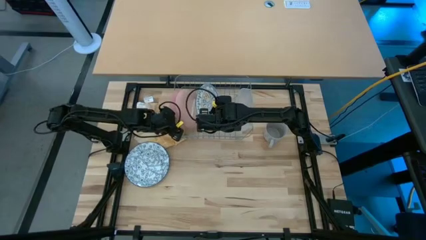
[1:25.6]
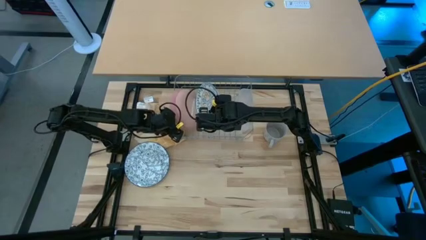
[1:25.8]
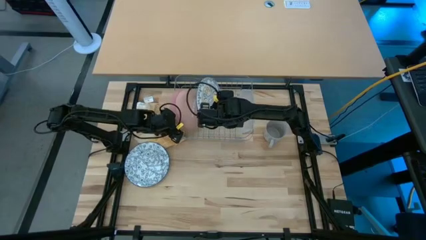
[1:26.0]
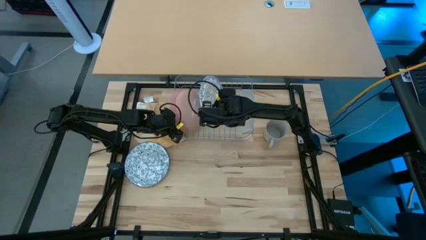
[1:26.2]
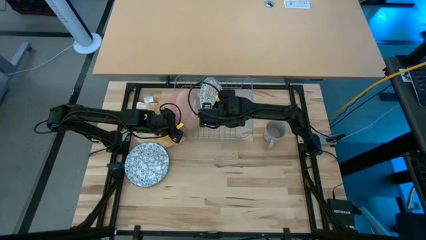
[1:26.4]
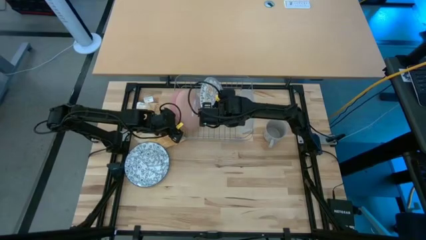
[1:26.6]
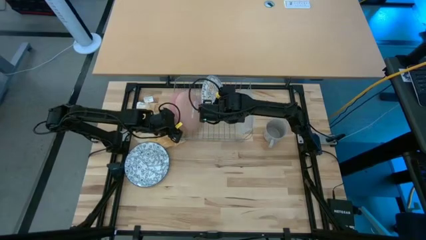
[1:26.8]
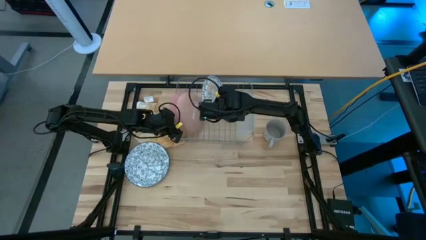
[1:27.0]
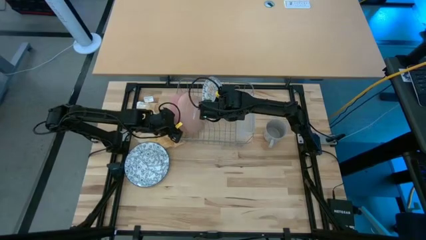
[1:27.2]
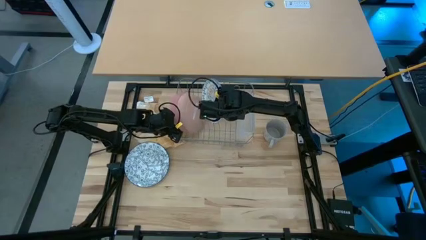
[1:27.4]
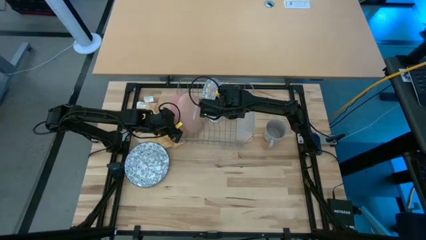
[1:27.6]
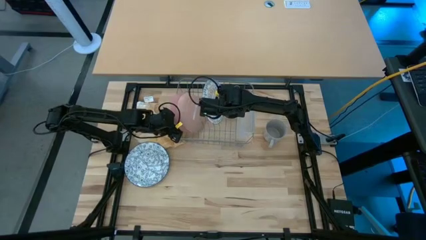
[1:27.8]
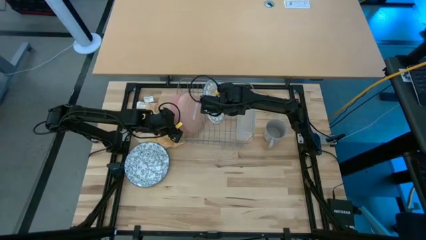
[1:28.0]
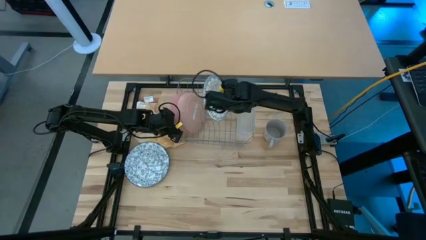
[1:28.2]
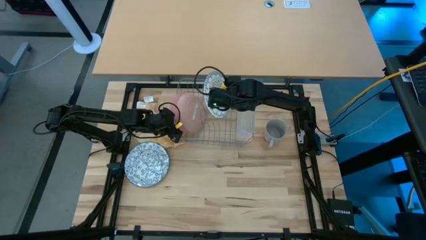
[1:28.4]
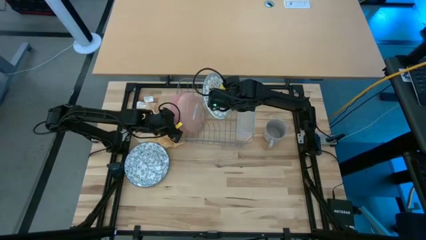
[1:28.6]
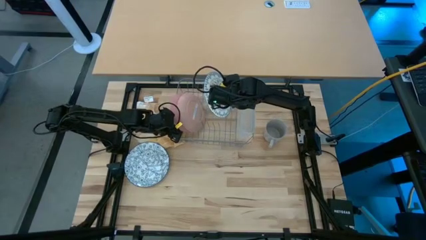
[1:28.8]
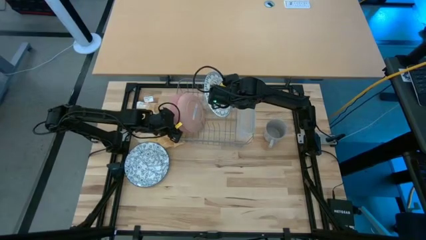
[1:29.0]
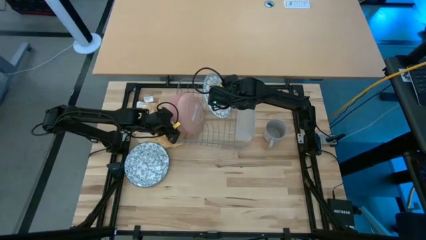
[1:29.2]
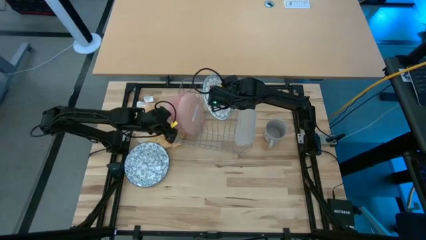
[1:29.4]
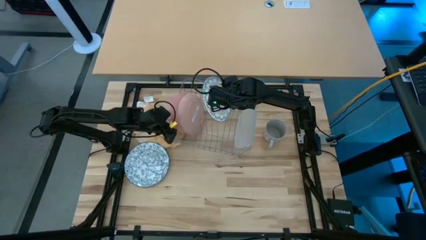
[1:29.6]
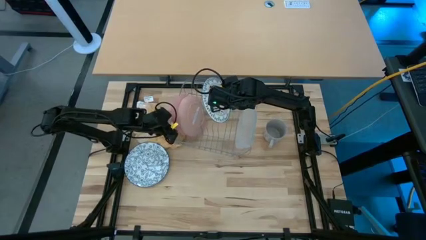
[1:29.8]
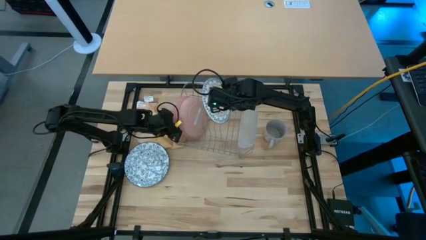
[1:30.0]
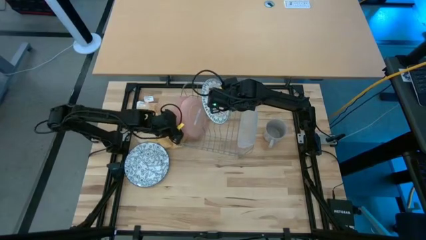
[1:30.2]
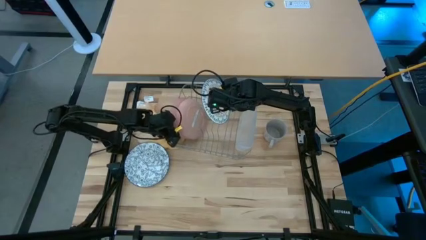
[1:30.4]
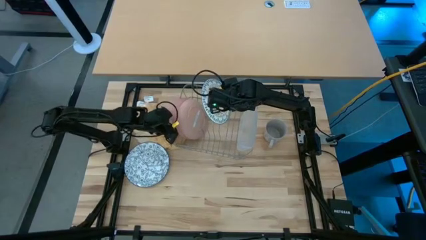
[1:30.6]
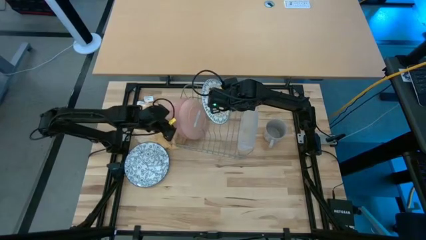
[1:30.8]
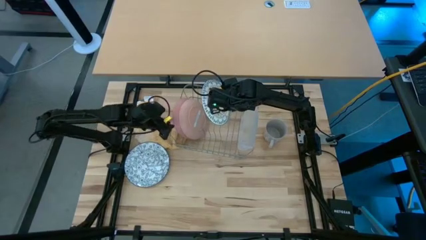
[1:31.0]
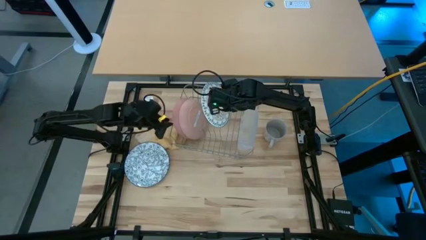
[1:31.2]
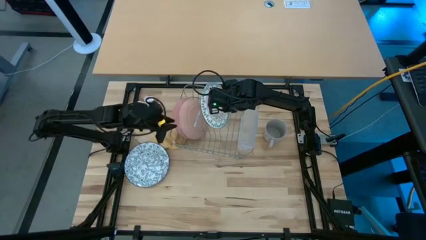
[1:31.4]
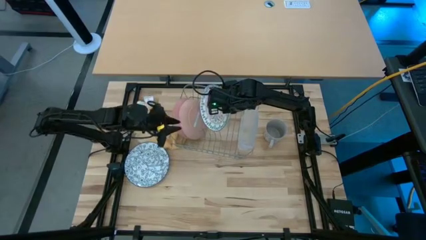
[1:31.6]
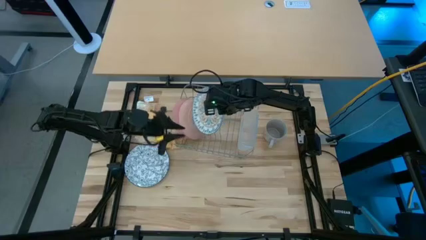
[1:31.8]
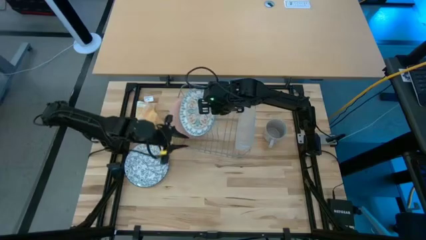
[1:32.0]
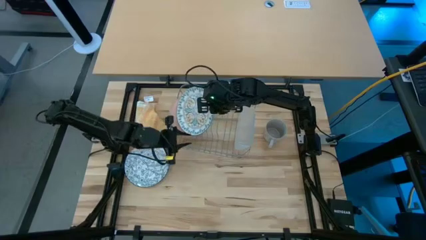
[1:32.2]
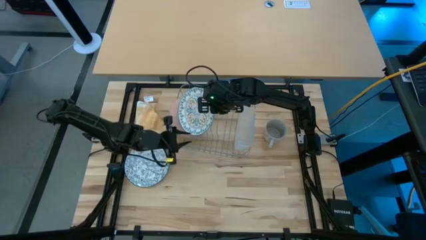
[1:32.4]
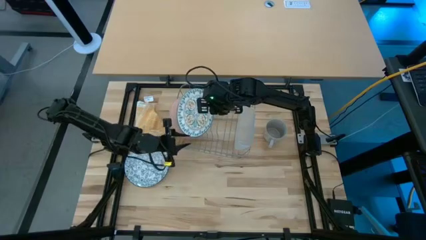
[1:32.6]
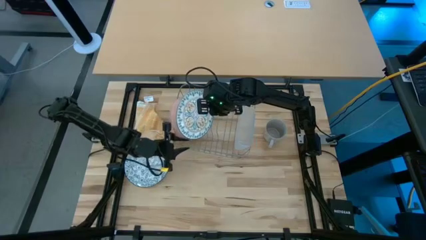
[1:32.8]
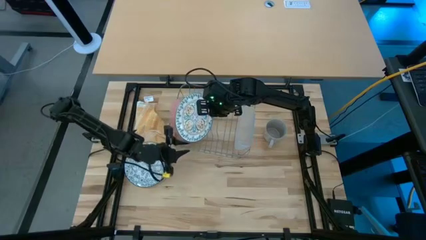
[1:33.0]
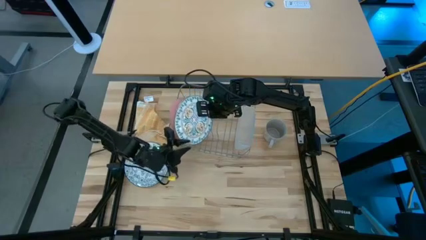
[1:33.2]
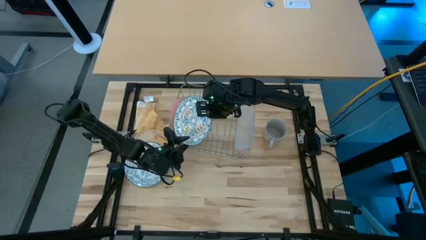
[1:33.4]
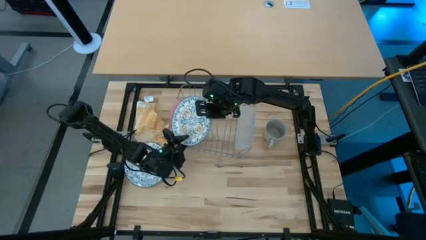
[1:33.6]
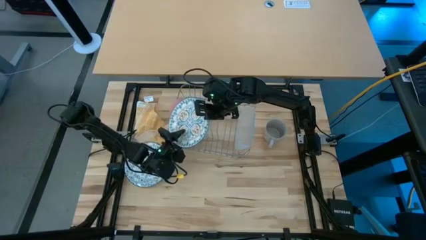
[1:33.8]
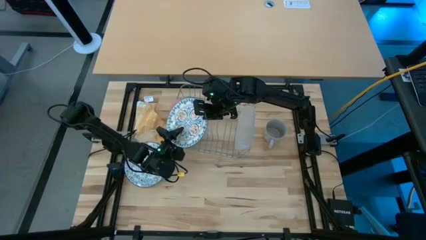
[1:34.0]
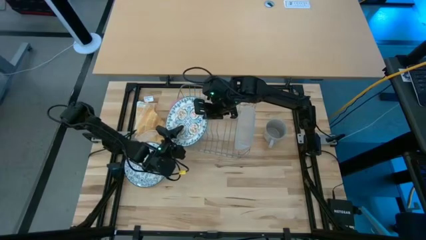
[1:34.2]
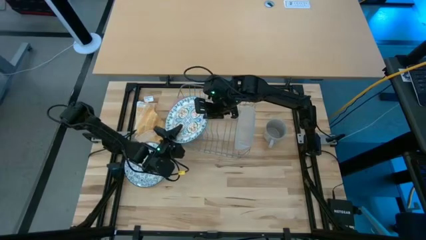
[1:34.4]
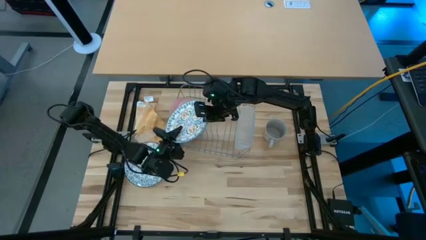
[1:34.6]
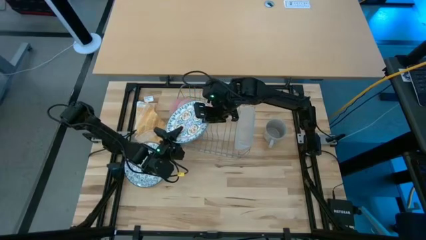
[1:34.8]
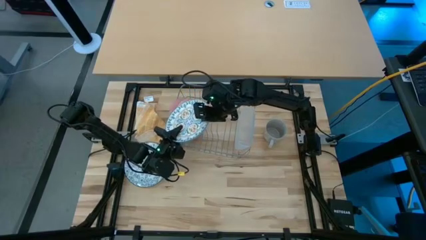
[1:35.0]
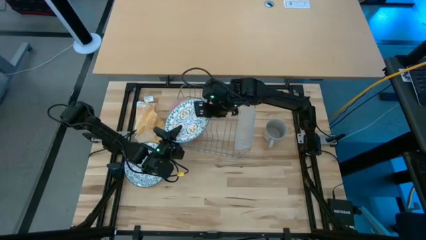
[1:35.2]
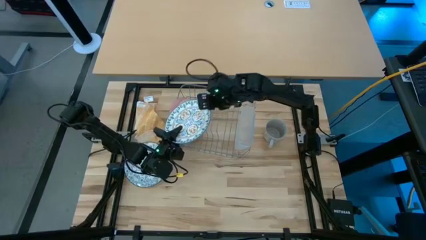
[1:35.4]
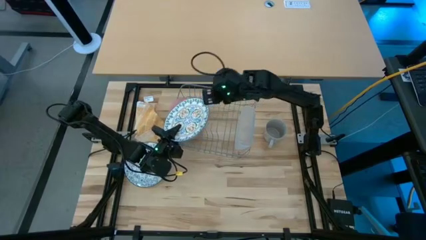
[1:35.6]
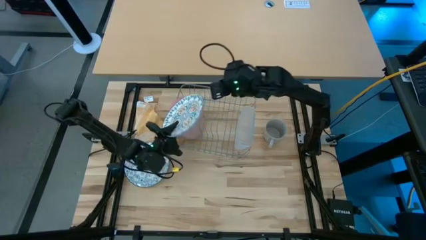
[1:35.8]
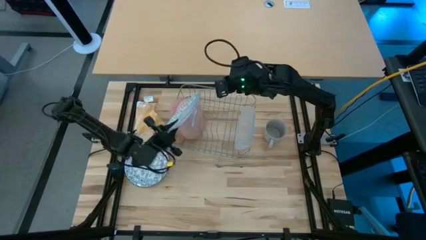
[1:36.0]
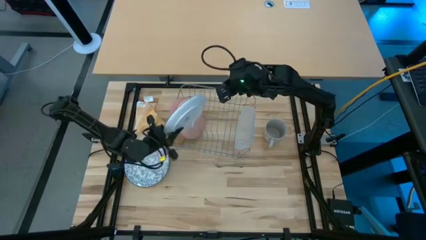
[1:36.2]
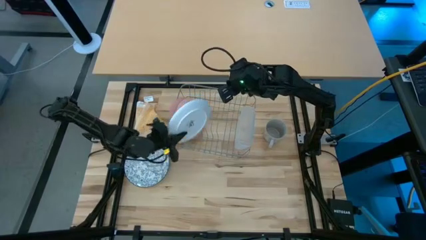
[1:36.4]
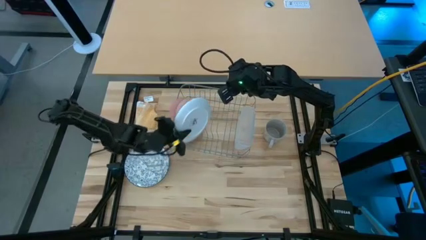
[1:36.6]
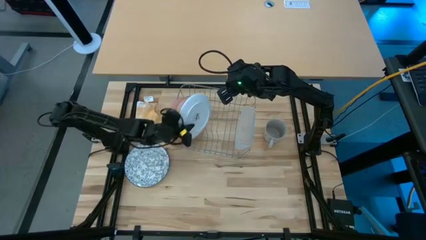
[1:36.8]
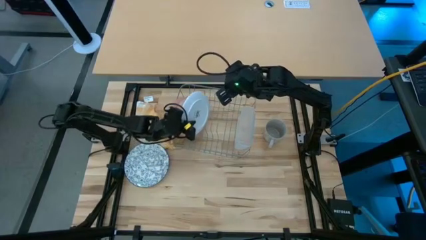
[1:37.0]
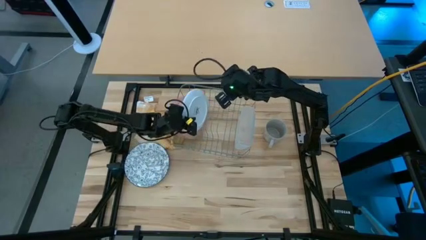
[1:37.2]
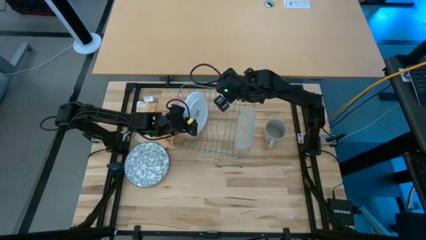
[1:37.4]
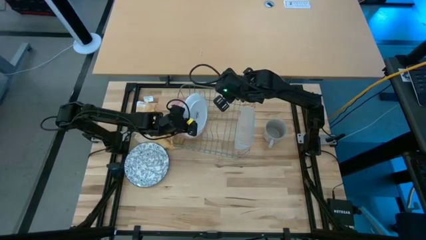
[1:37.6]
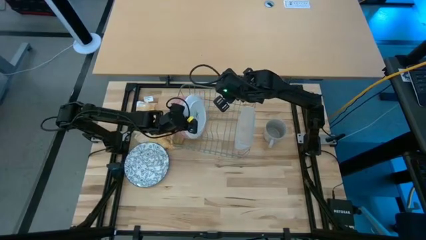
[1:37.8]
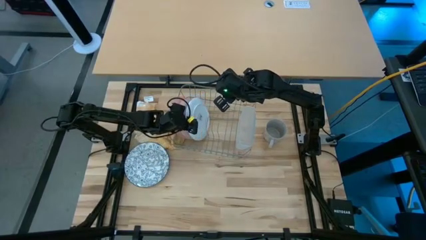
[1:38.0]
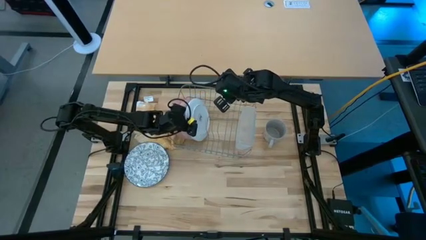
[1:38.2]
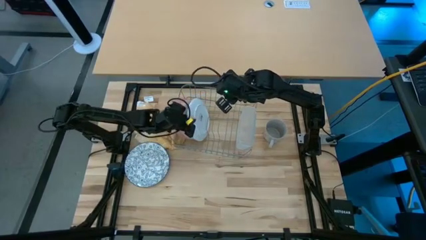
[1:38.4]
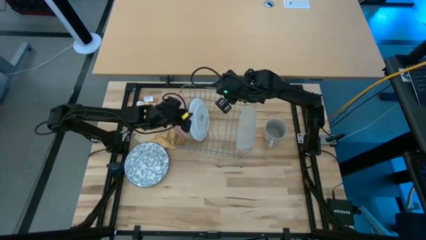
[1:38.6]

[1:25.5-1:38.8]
Task: Sort dishes
Put the white patterned plate in the dish rack
